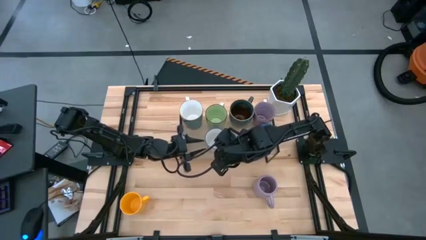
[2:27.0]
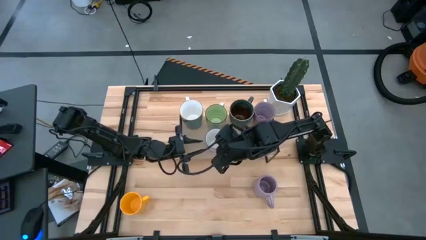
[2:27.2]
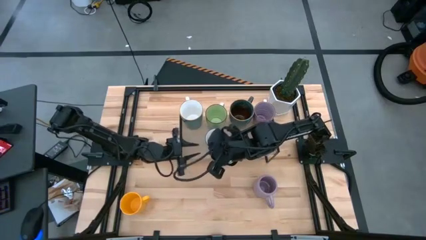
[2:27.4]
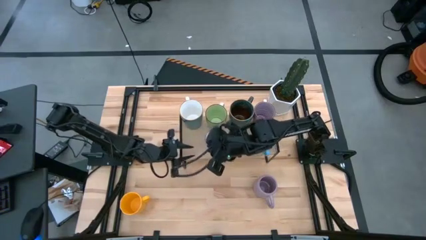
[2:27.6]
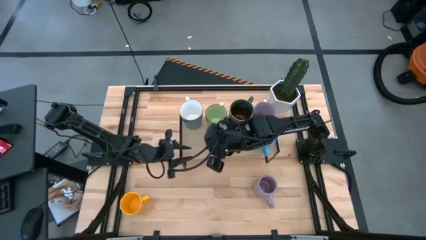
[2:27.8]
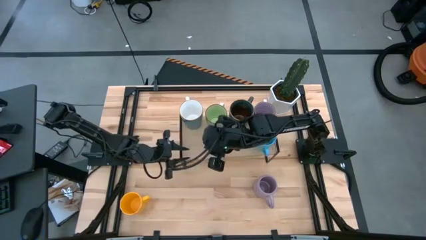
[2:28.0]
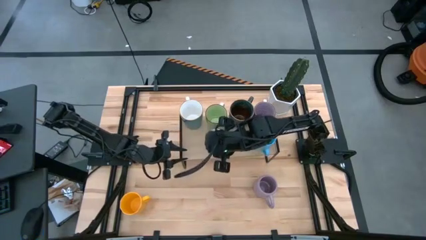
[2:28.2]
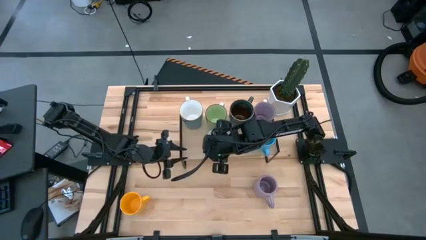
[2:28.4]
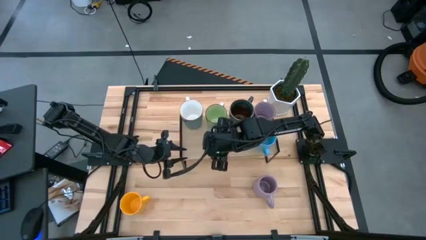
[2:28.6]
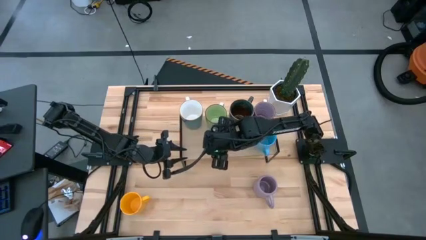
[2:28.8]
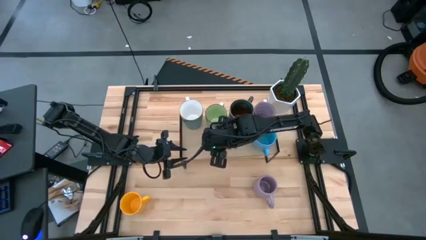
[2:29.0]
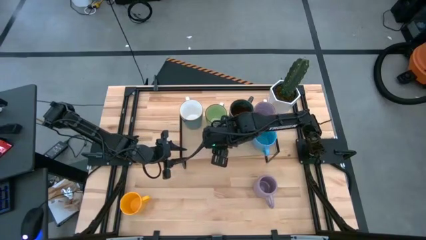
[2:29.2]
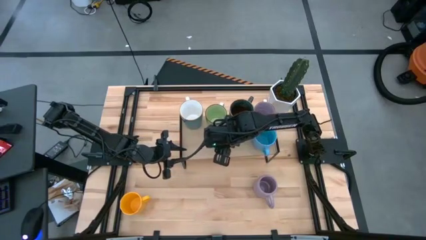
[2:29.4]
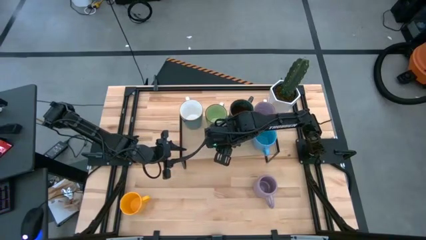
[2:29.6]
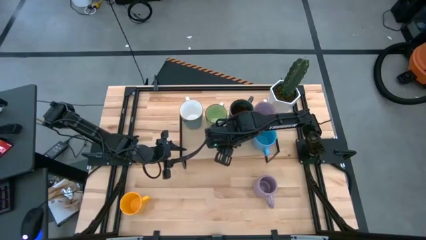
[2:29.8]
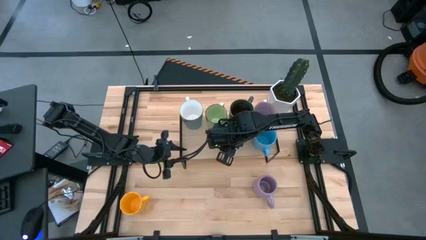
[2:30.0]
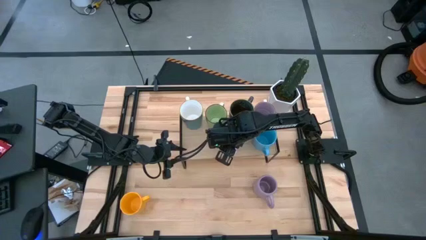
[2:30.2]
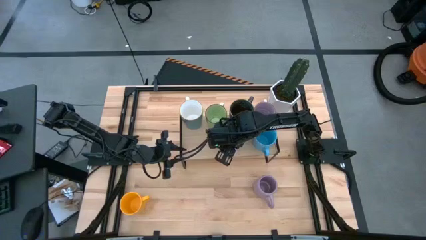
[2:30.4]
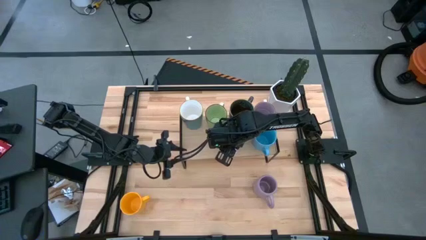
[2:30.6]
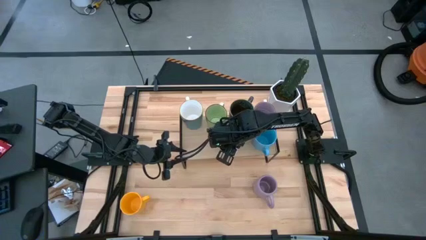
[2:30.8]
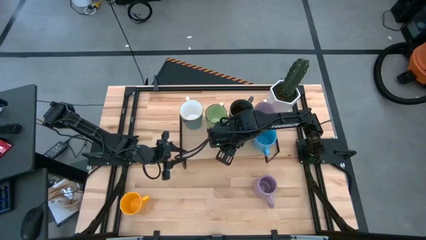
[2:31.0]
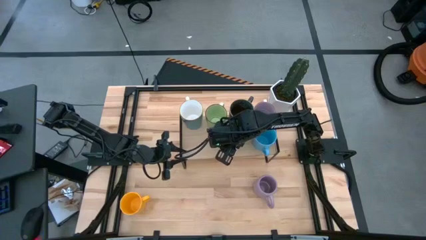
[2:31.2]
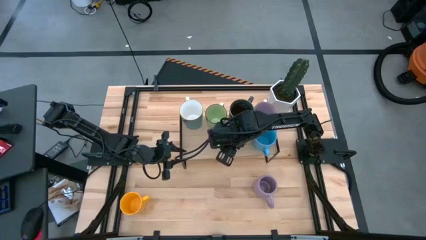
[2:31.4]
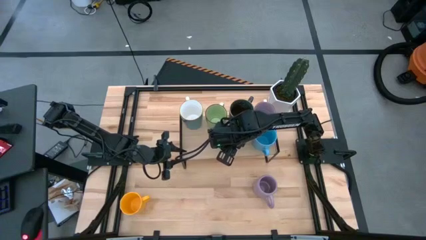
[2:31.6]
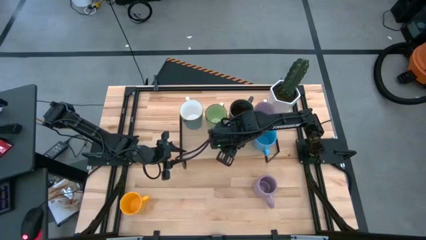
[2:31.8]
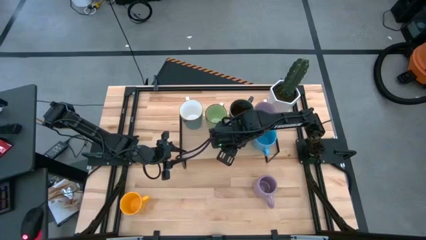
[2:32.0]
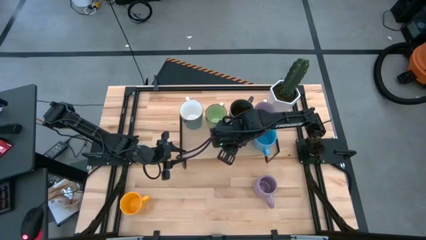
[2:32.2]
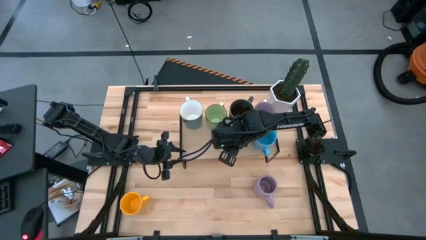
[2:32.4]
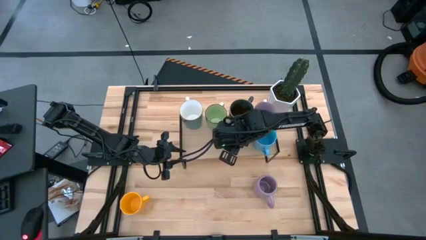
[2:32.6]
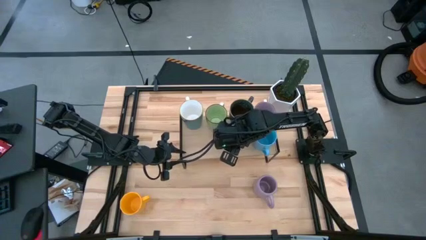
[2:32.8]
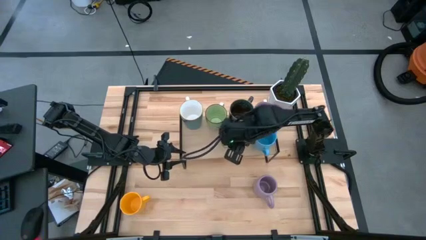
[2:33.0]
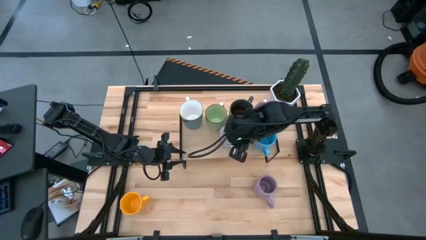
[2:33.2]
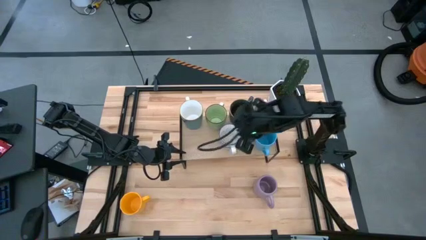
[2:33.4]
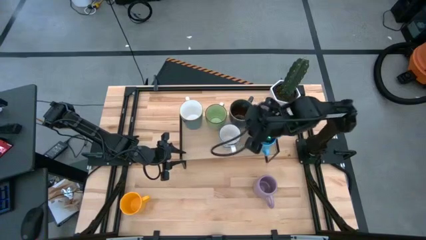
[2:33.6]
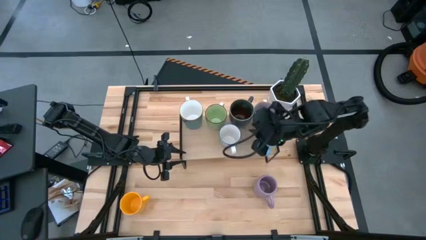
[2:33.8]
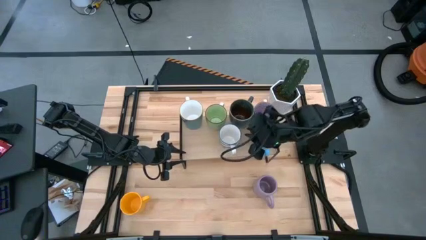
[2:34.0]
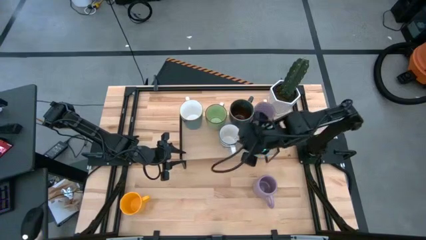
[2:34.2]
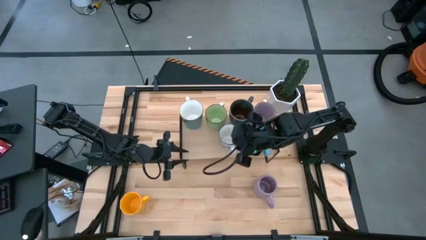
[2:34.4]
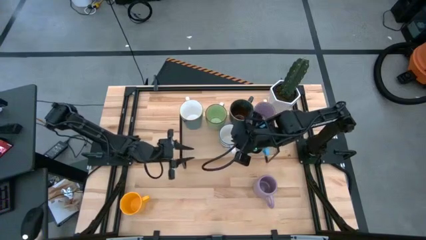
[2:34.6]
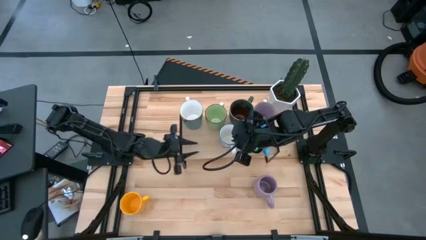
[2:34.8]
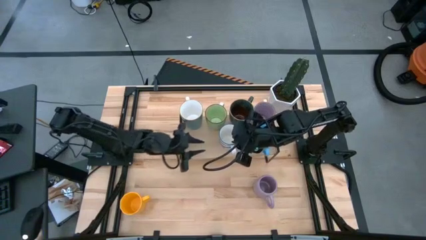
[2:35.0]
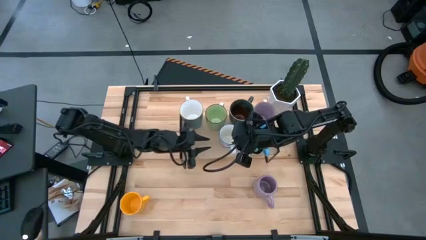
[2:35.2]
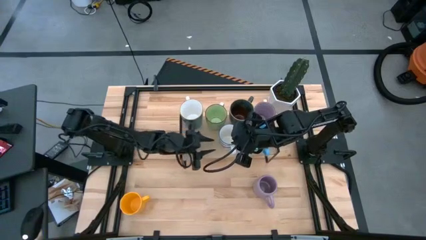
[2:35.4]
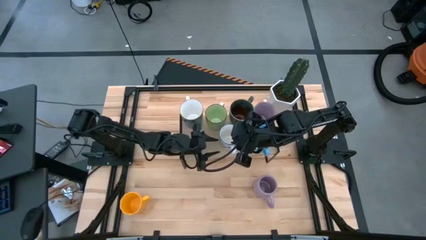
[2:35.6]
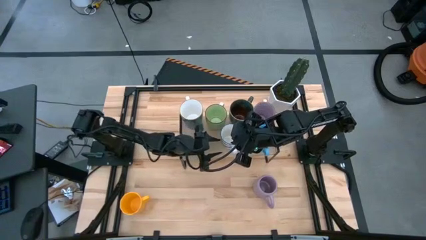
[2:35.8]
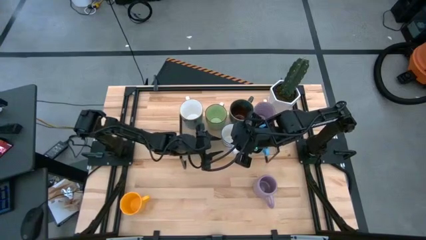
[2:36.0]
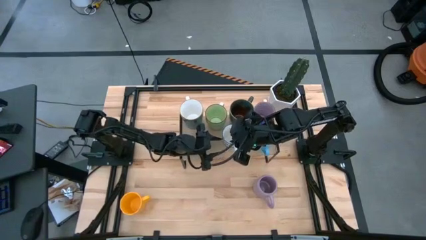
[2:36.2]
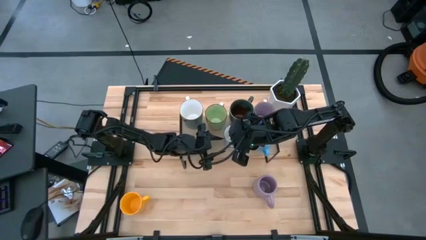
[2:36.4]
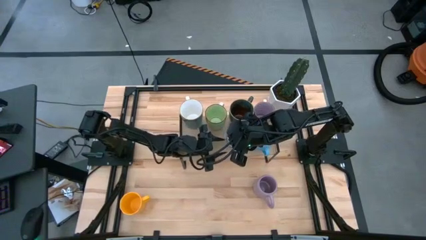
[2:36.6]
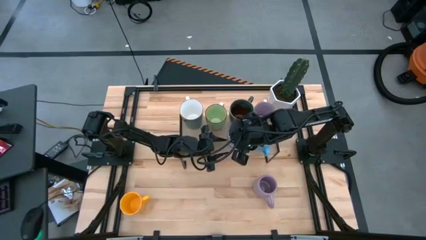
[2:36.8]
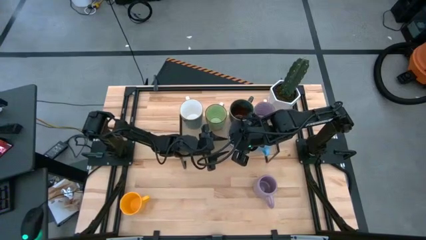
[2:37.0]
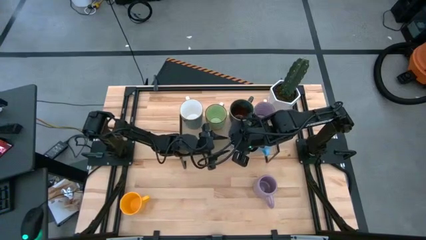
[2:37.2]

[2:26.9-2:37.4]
Task: Place coffee mugs
Put the white mug on the shelf aligned with the other dark green mug on the shelf

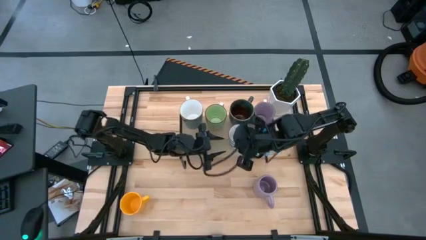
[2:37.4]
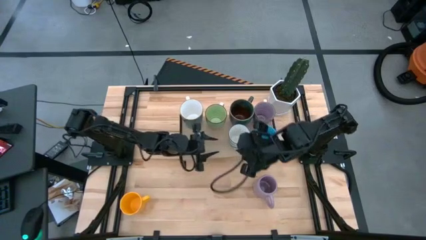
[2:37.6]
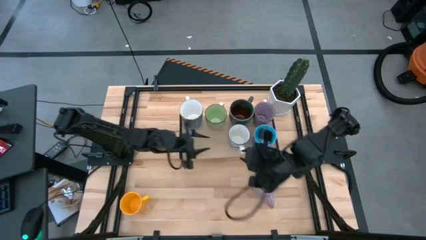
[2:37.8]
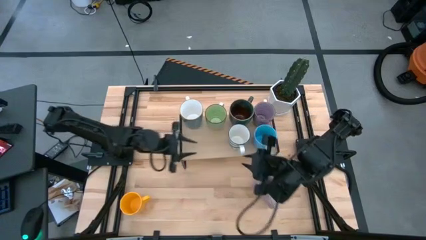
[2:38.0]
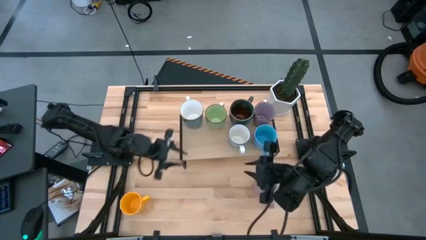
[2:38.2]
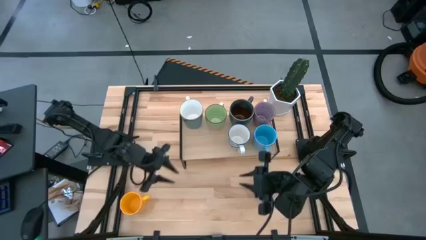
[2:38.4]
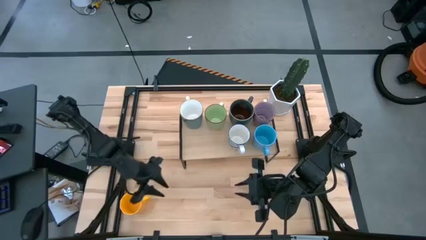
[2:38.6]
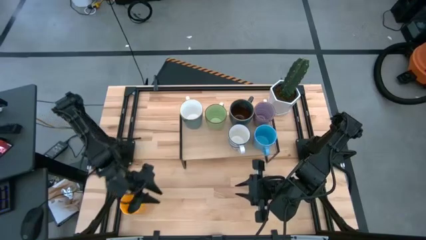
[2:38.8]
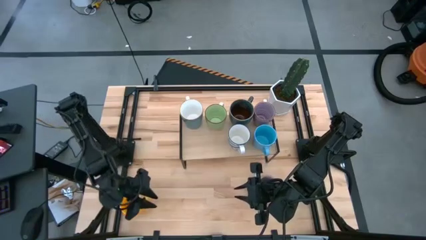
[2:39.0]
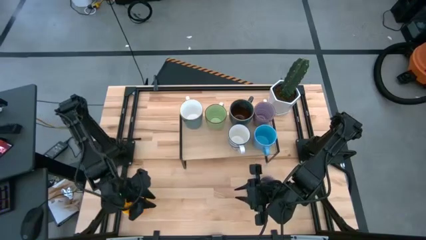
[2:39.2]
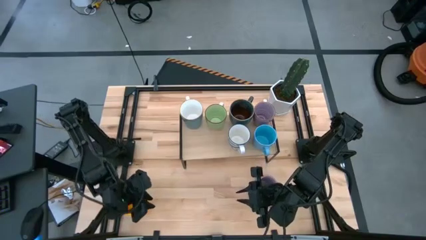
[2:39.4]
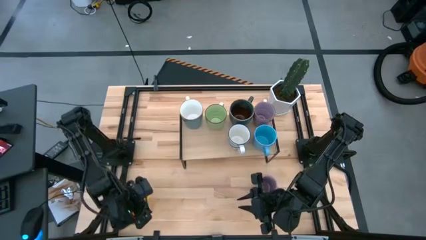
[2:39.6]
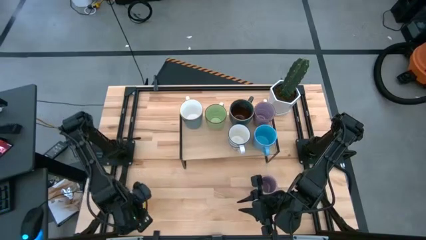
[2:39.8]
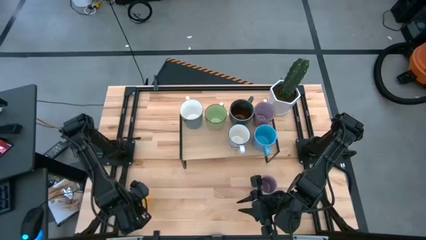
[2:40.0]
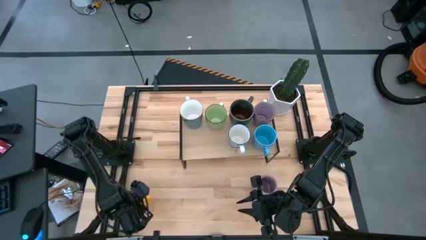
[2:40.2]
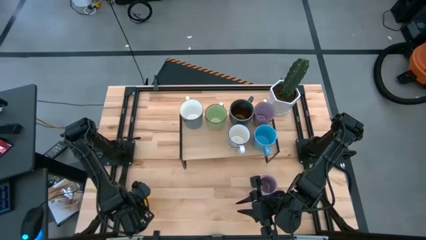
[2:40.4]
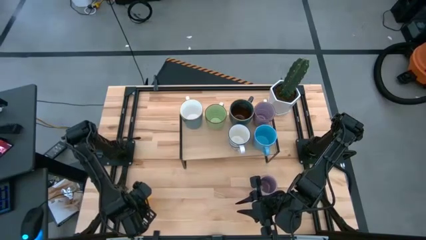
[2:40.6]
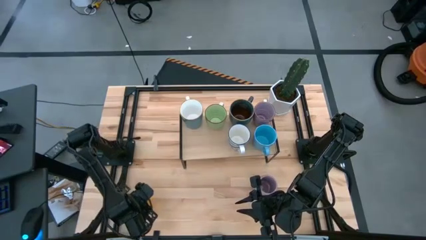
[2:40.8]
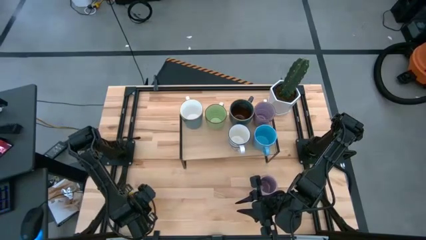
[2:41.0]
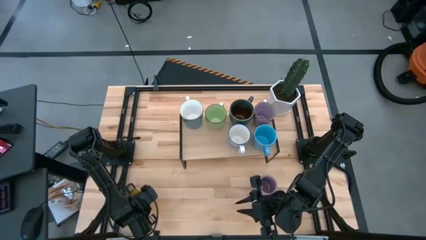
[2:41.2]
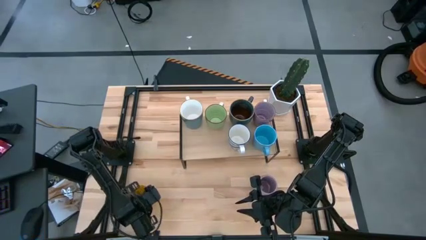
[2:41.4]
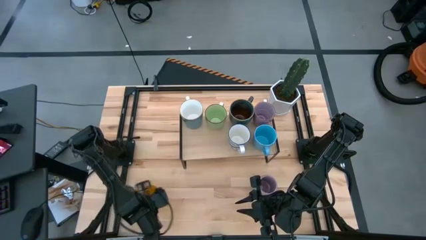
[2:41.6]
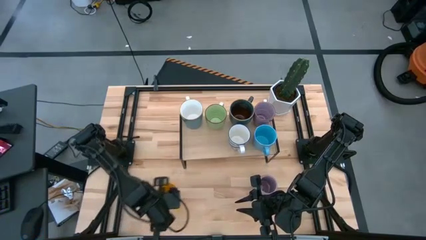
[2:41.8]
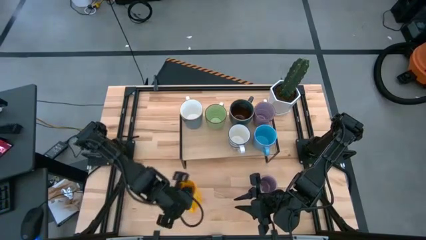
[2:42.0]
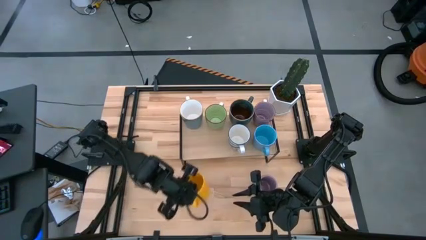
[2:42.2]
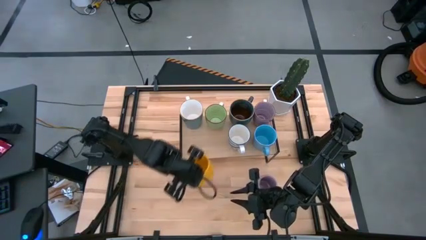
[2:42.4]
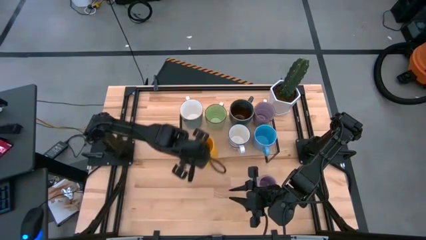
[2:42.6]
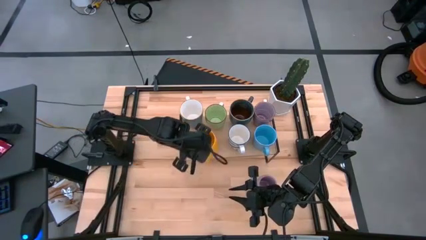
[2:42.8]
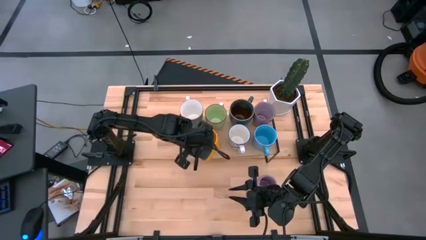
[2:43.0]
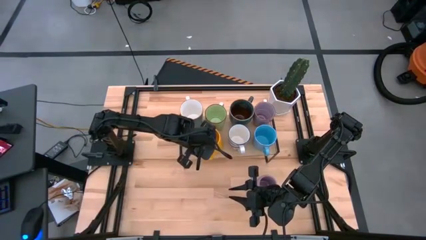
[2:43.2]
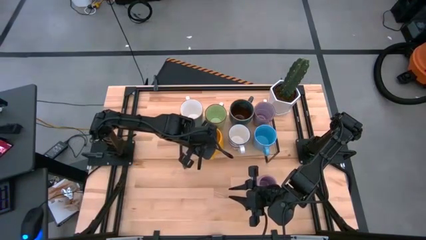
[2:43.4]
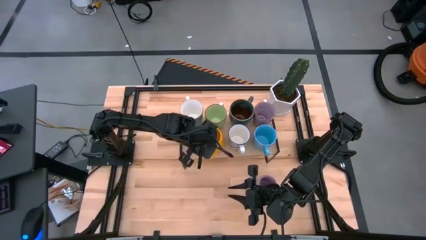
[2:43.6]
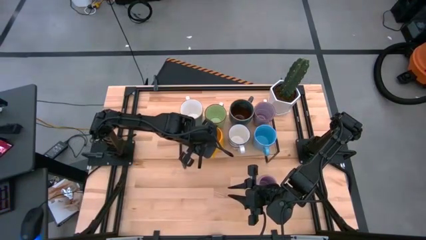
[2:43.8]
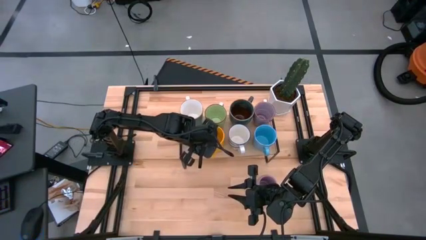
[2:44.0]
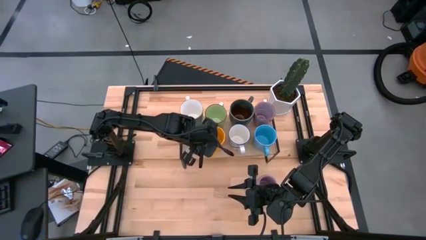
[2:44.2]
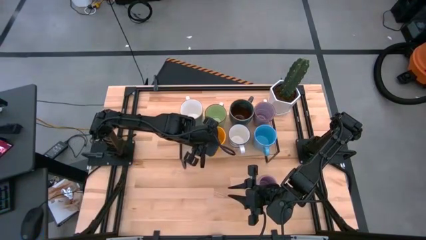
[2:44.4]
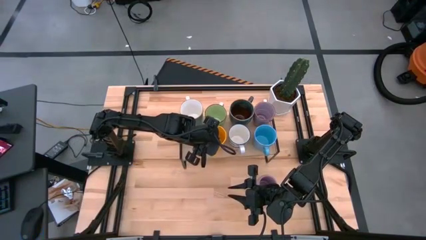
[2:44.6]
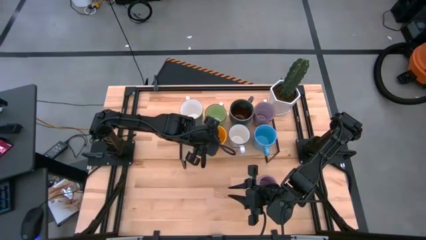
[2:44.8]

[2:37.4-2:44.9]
Put the yellow mug on the shelf aligned with the other light green mug on the shelf
